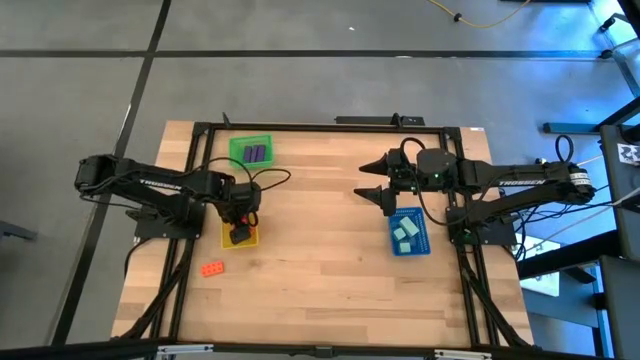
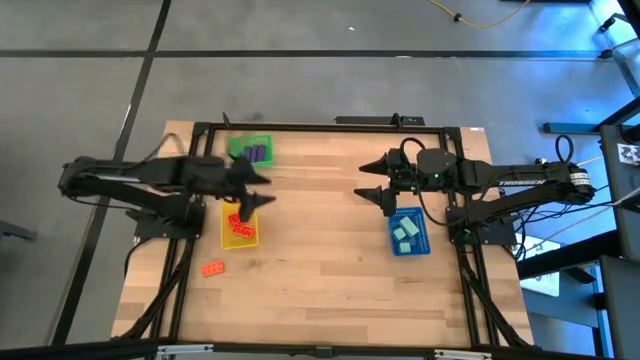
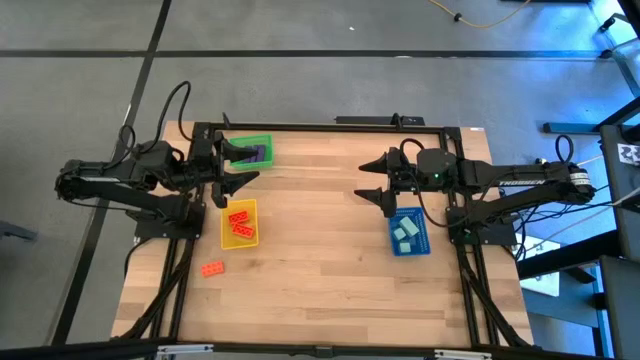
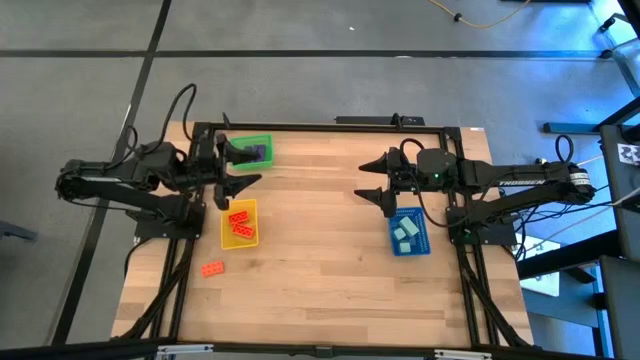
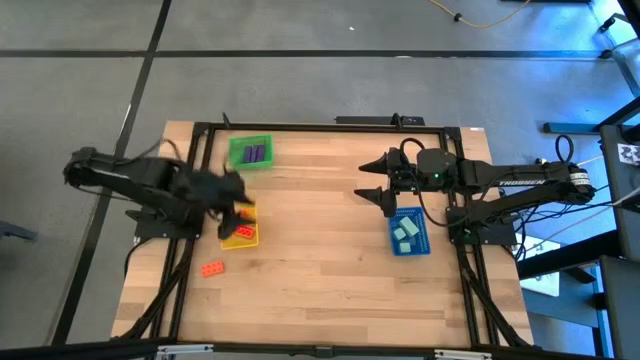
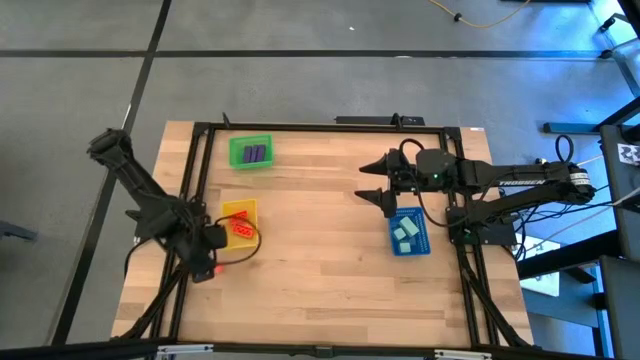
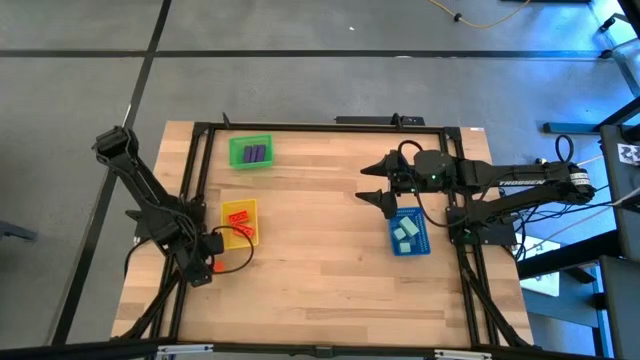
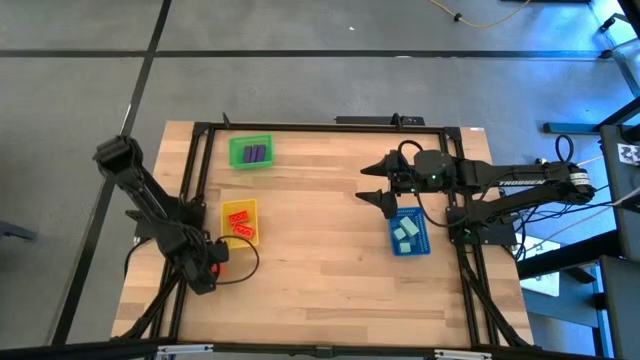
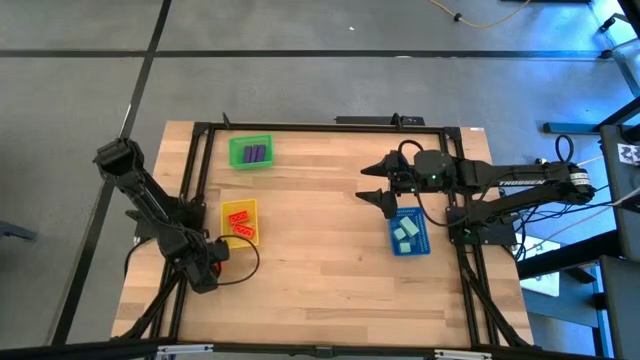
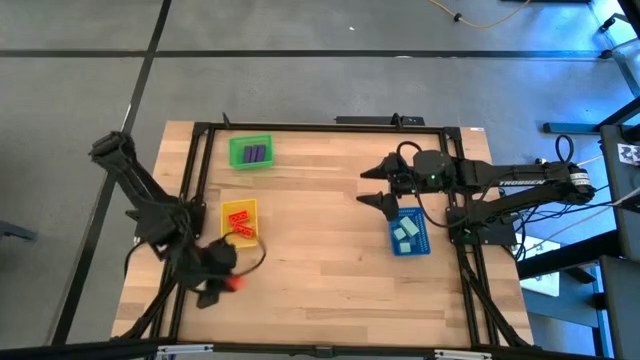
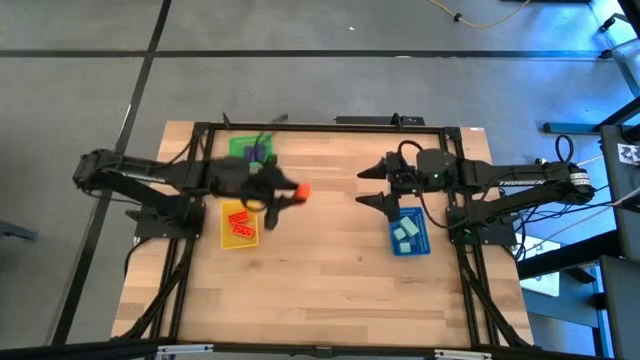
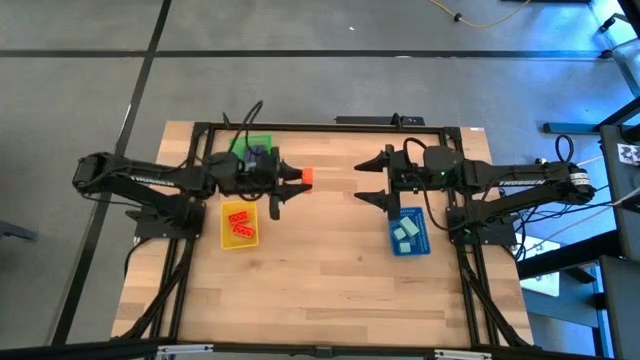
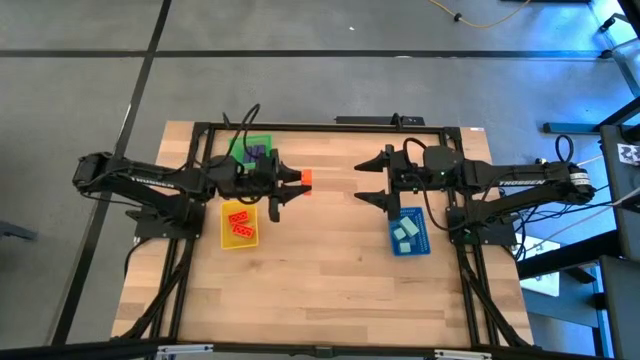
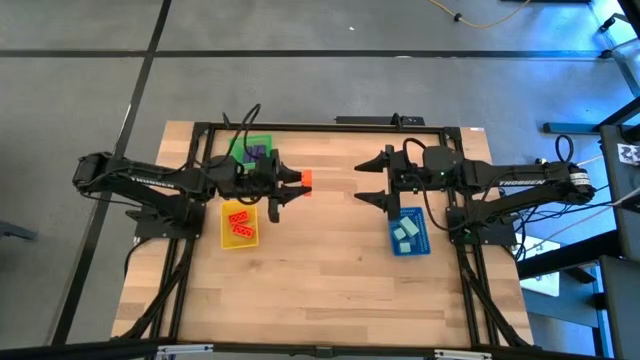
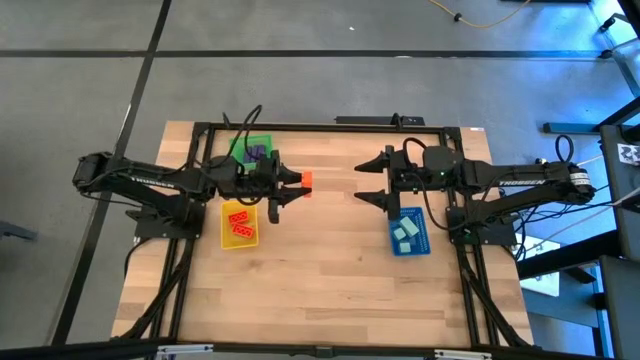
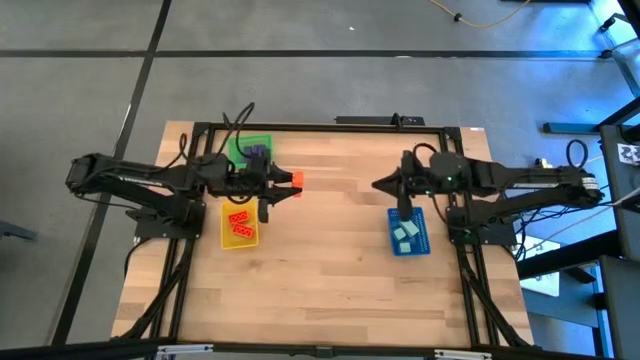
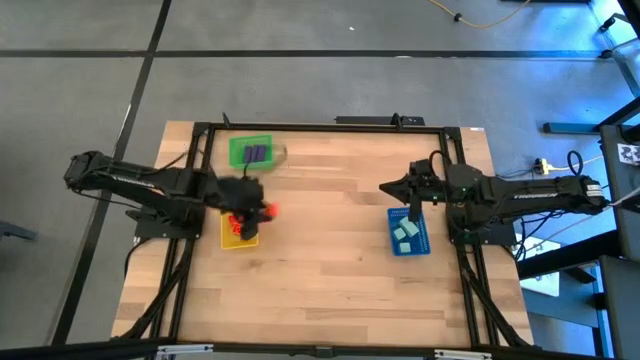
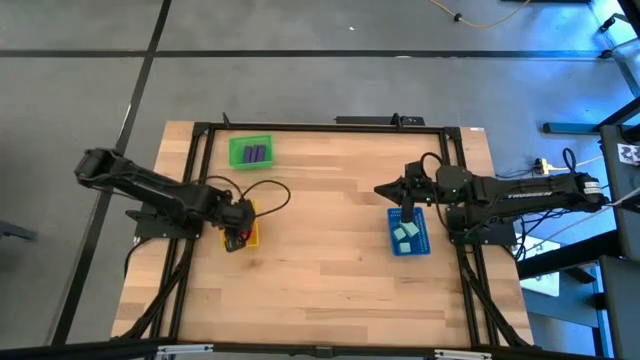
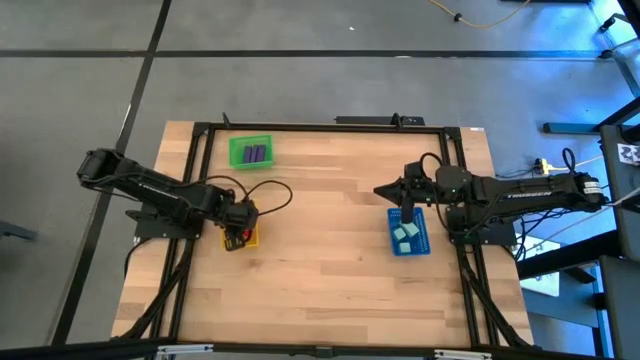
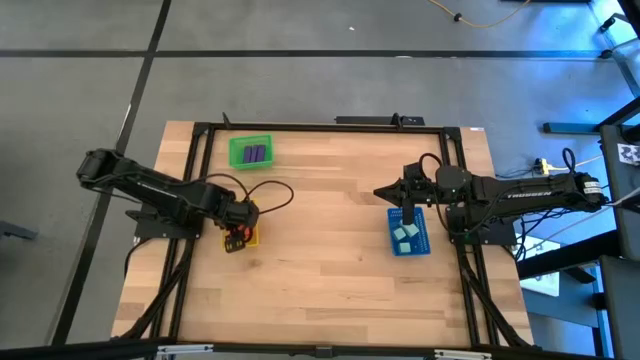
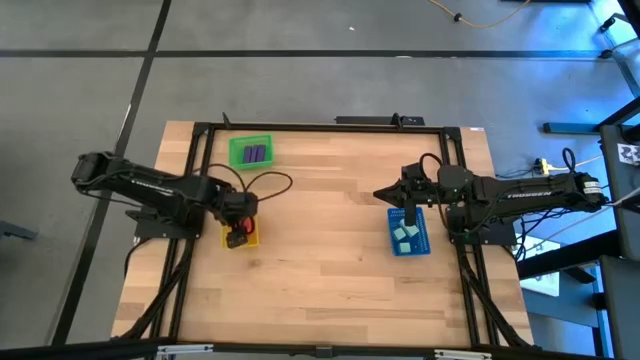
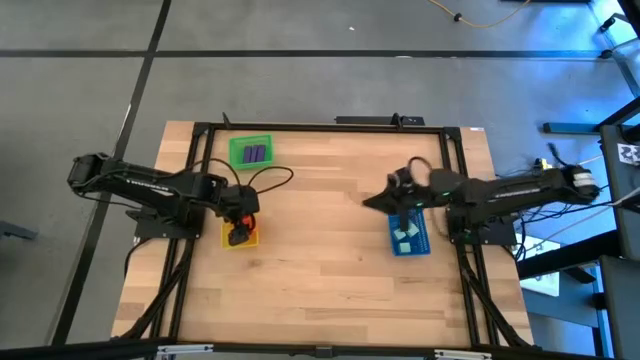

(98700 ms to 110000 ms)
Task: Sort & place blocks by color
Put the game piece into the yellow bin

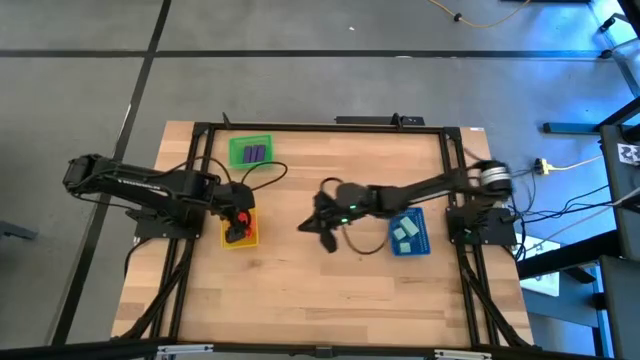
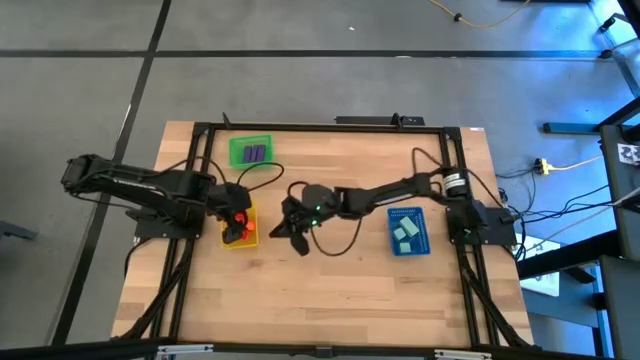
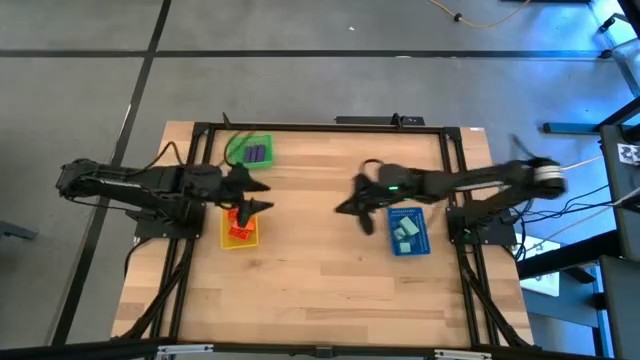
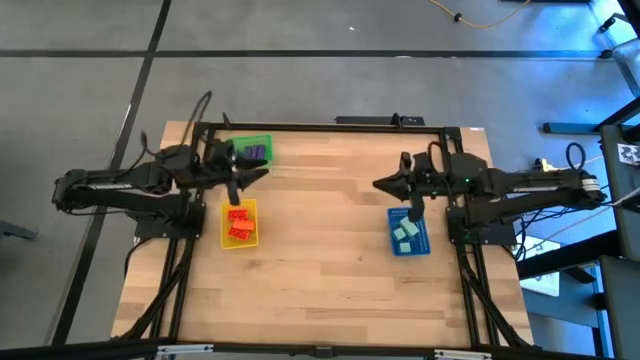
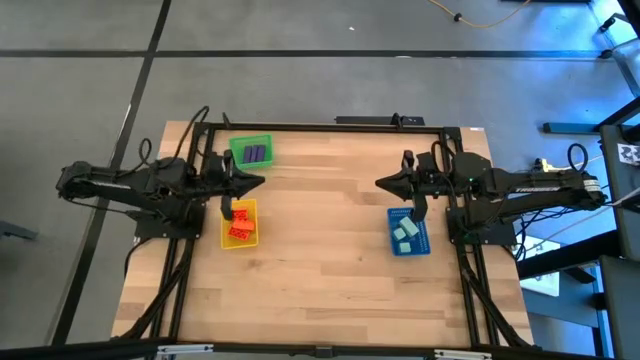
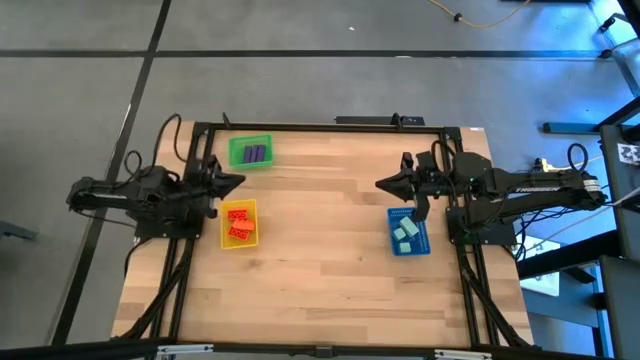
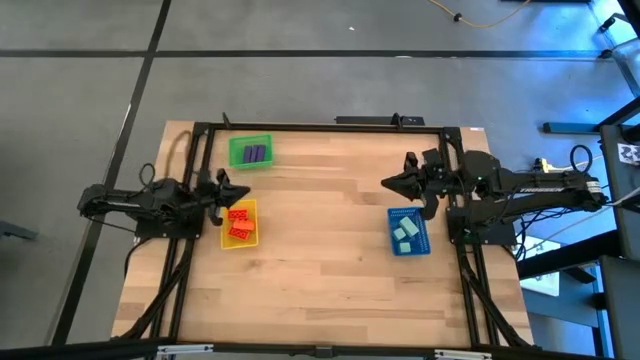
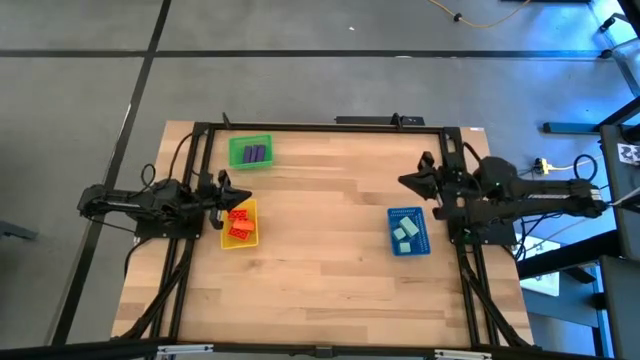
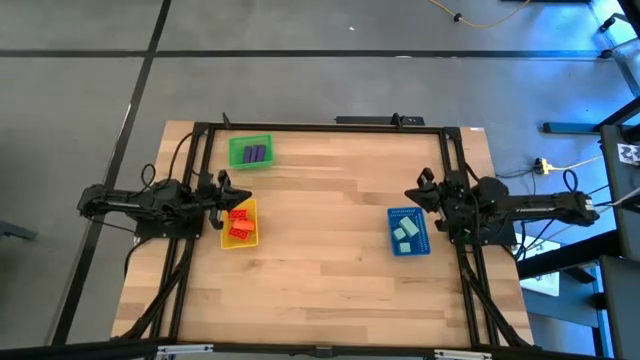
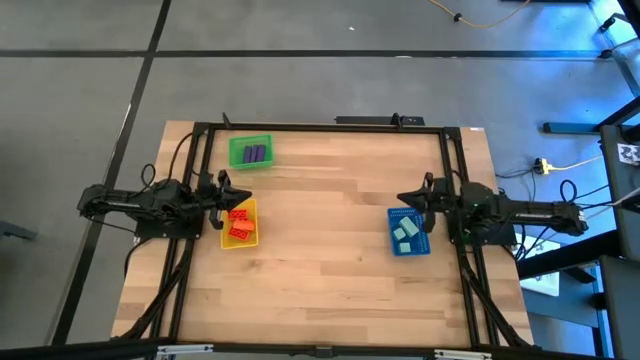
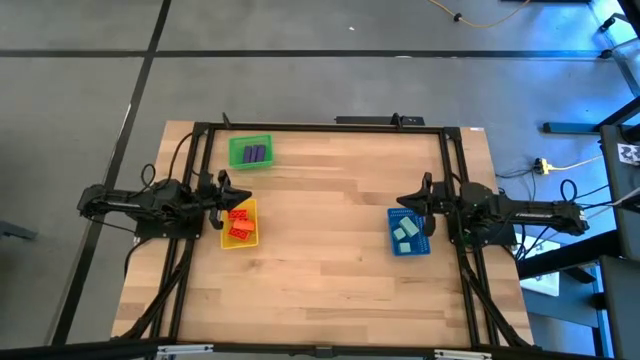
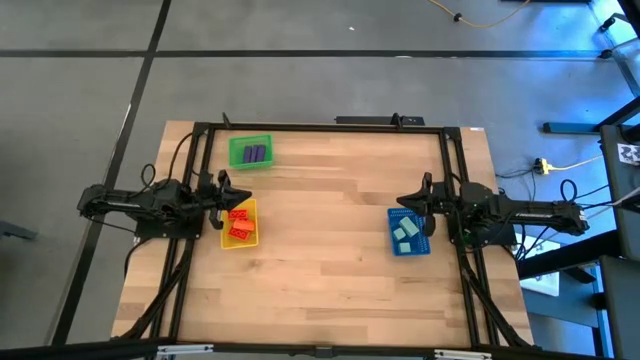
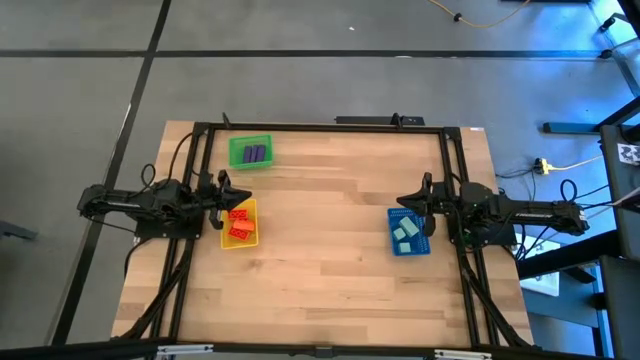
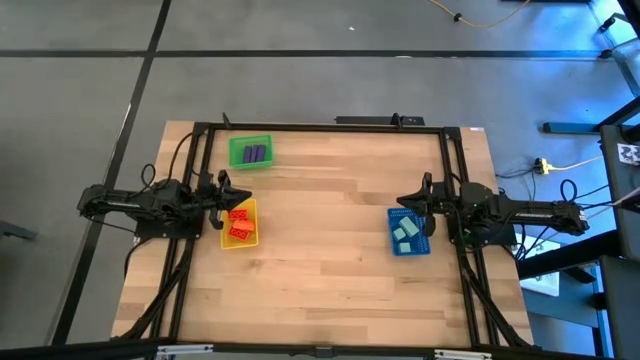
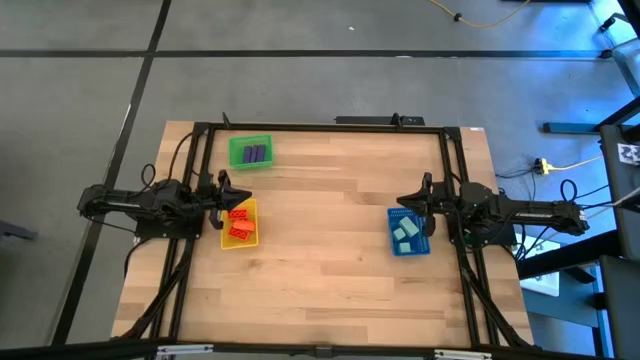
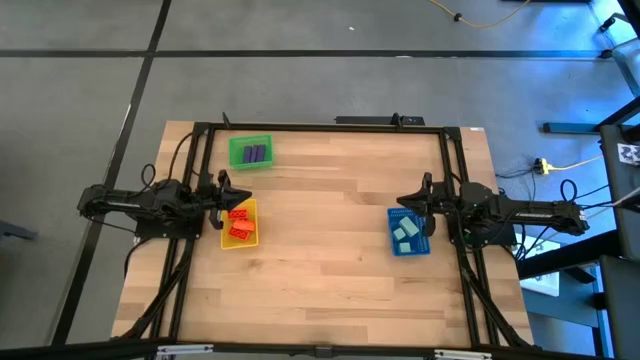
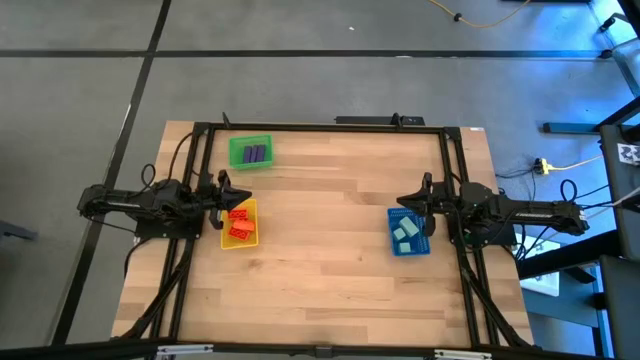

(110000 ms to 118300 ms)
Return to Home Position

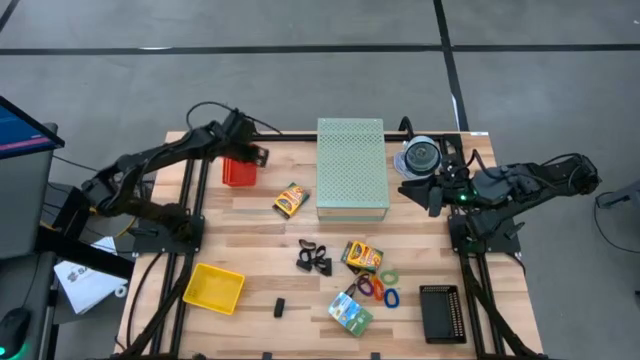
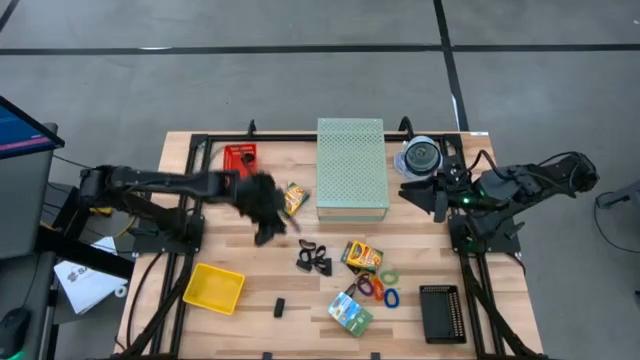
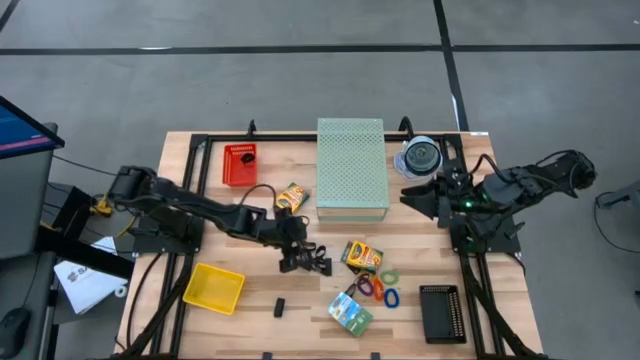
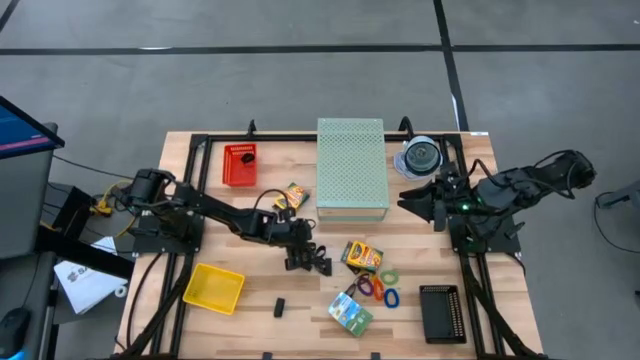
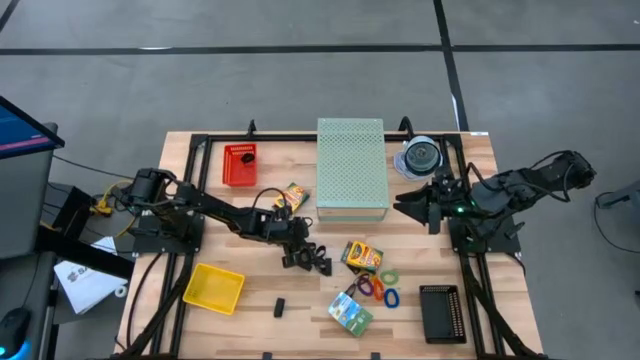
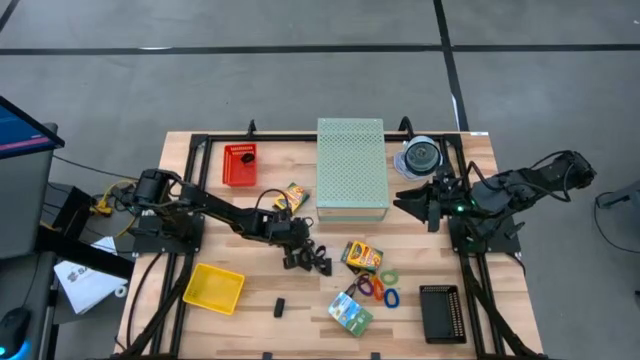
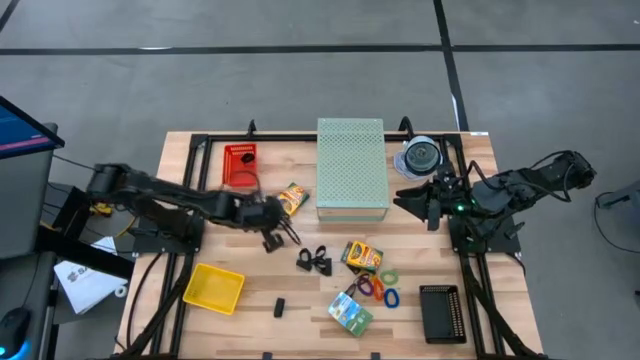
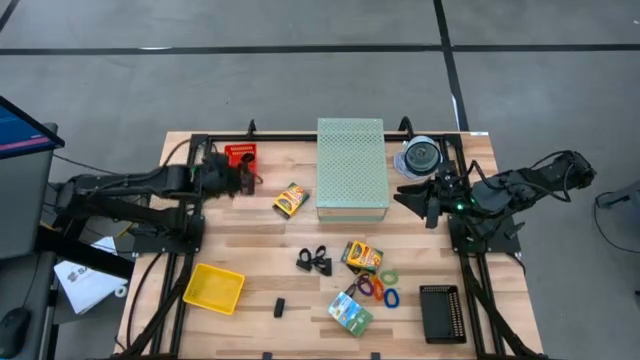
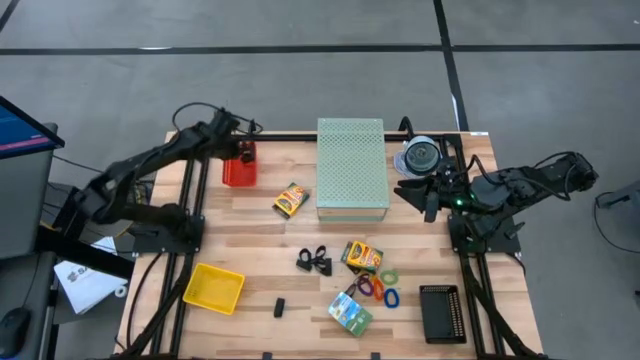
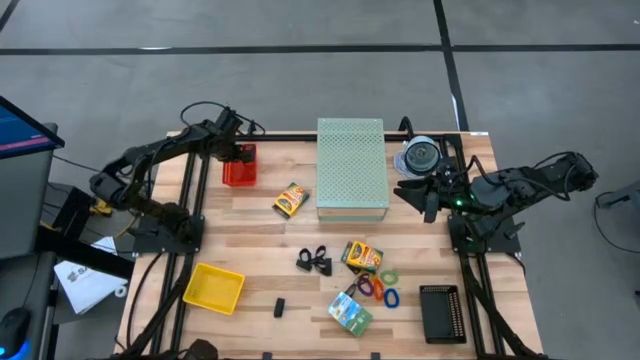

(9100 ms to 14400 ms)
Task: Pick & Place Office Desk Supplies
Put the black rubber band into the red bin
